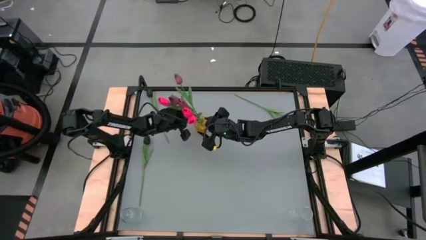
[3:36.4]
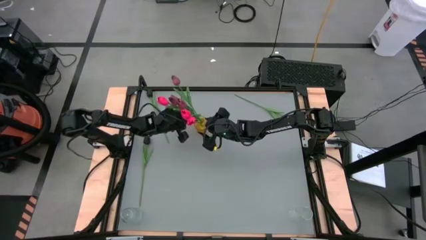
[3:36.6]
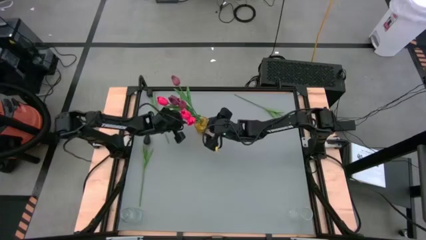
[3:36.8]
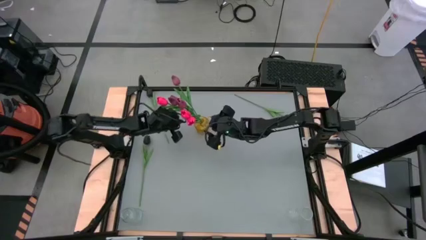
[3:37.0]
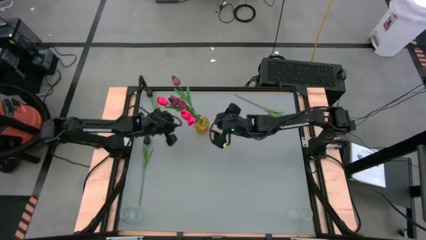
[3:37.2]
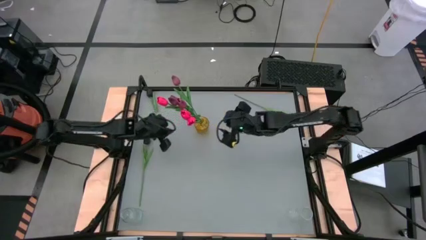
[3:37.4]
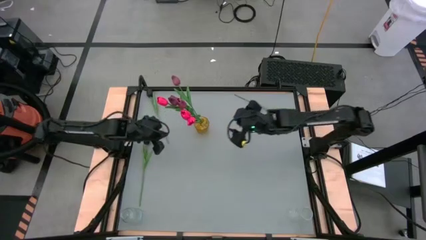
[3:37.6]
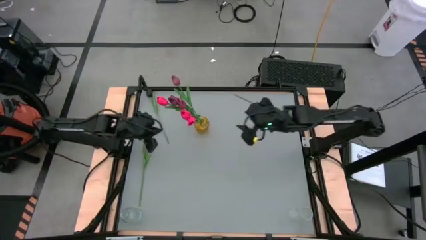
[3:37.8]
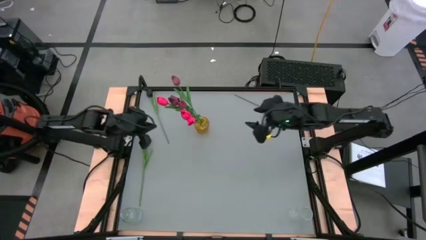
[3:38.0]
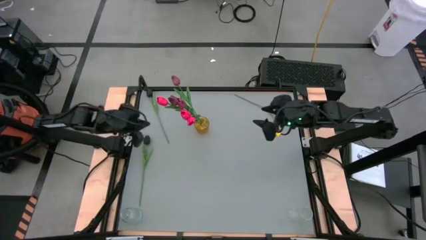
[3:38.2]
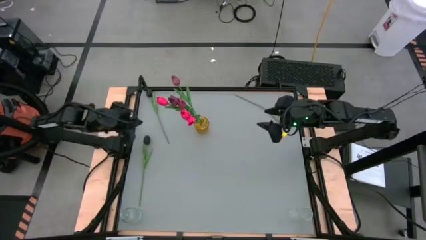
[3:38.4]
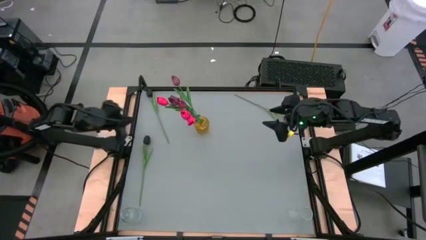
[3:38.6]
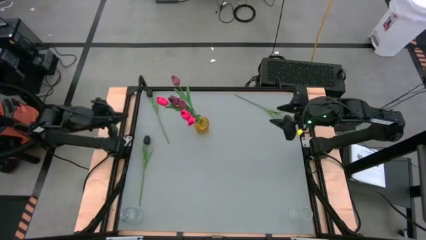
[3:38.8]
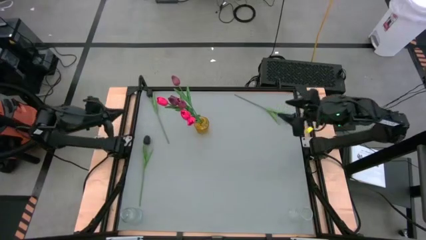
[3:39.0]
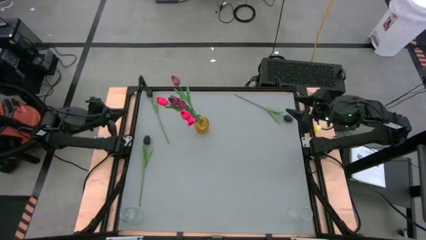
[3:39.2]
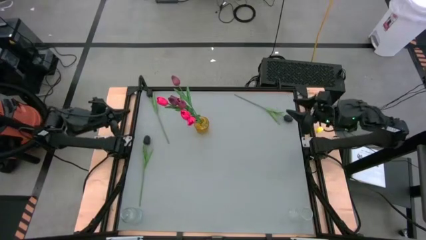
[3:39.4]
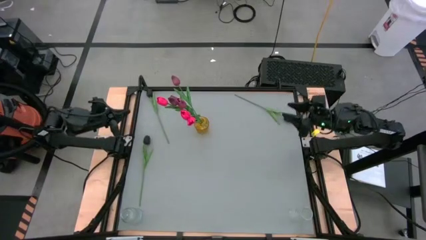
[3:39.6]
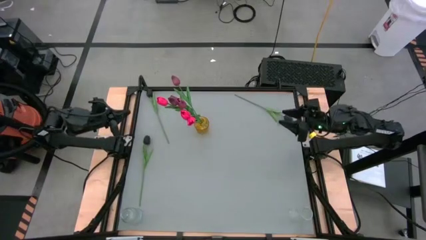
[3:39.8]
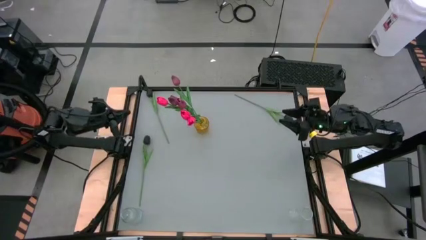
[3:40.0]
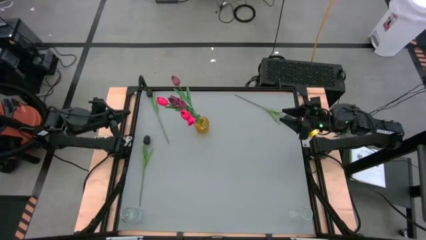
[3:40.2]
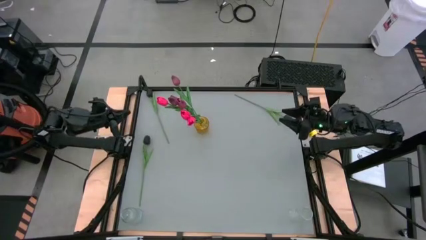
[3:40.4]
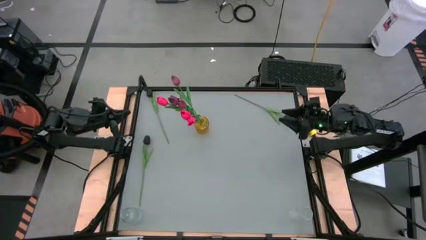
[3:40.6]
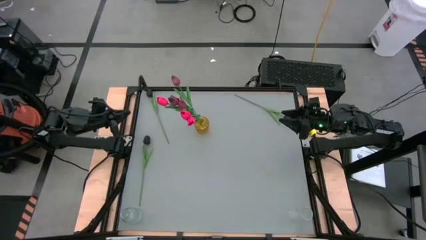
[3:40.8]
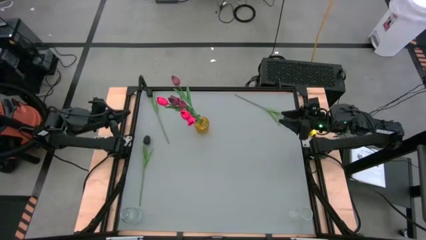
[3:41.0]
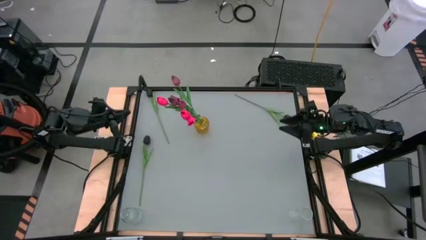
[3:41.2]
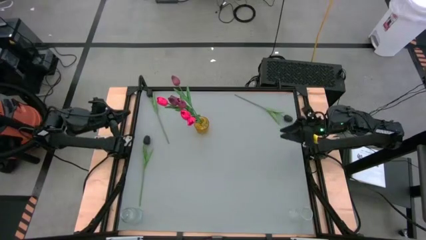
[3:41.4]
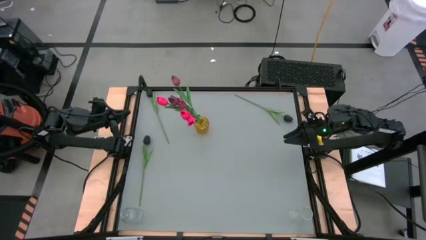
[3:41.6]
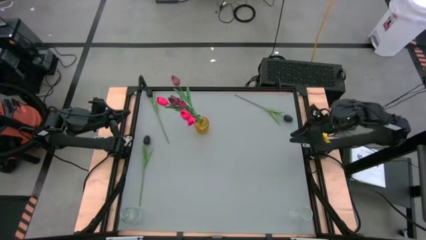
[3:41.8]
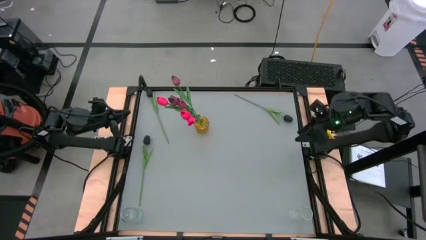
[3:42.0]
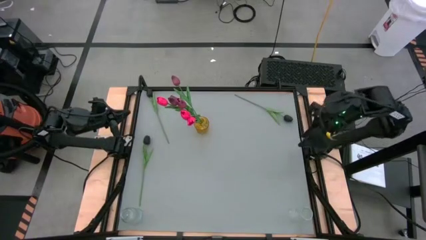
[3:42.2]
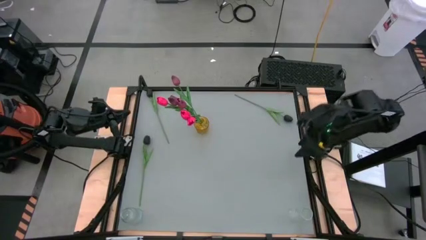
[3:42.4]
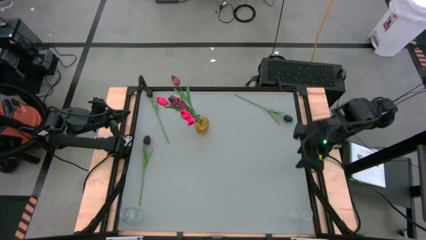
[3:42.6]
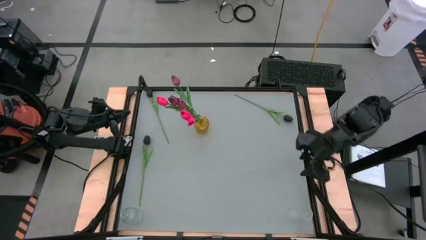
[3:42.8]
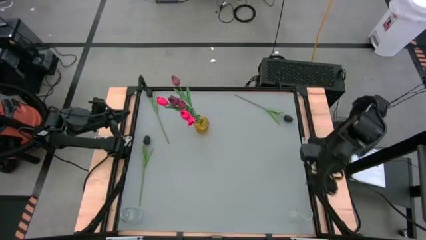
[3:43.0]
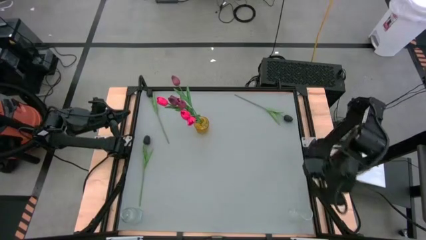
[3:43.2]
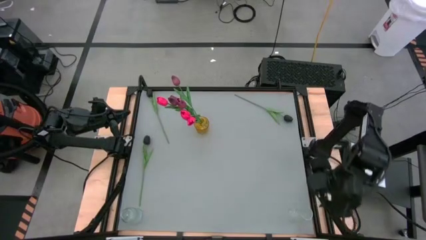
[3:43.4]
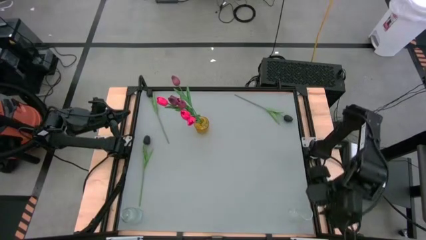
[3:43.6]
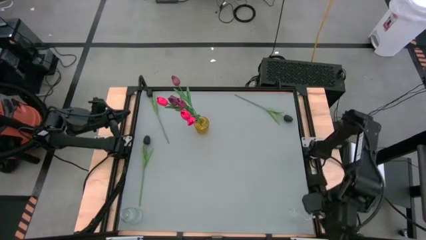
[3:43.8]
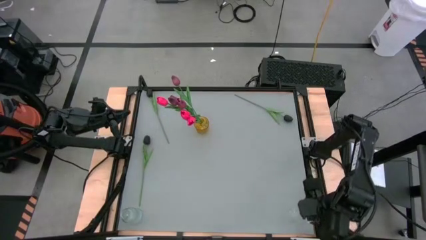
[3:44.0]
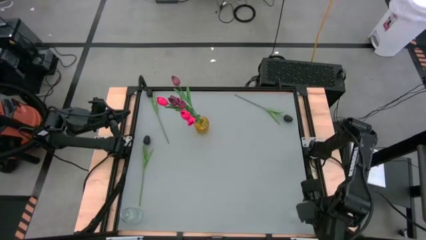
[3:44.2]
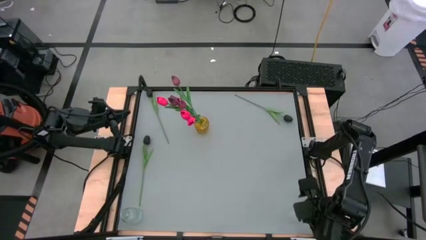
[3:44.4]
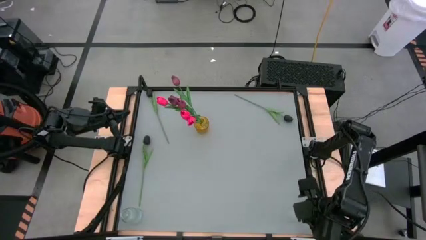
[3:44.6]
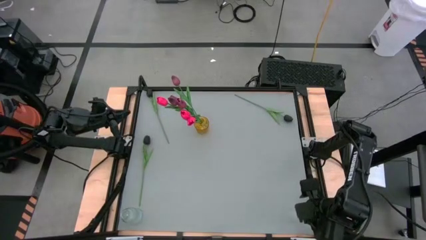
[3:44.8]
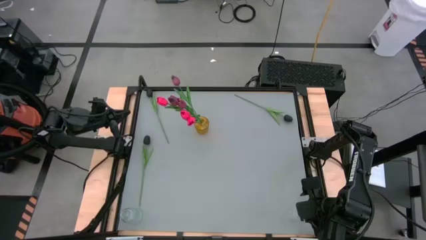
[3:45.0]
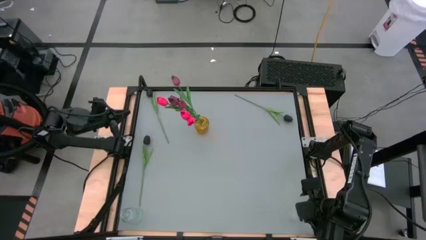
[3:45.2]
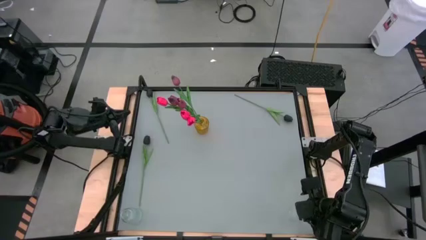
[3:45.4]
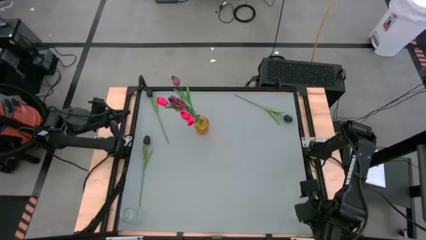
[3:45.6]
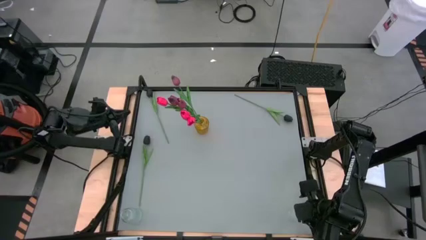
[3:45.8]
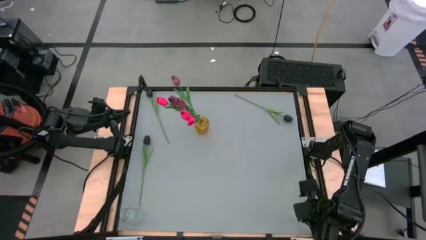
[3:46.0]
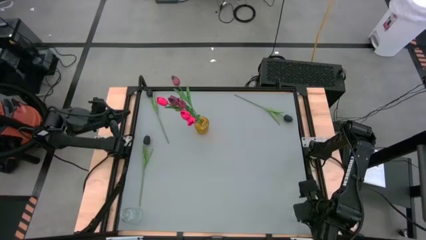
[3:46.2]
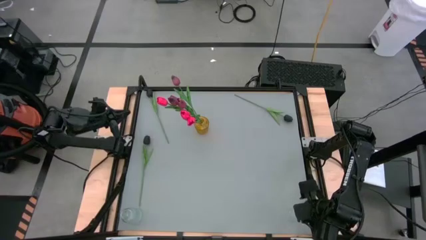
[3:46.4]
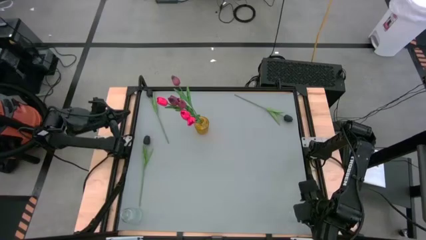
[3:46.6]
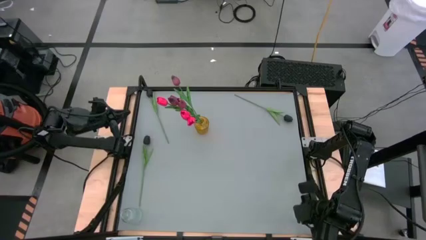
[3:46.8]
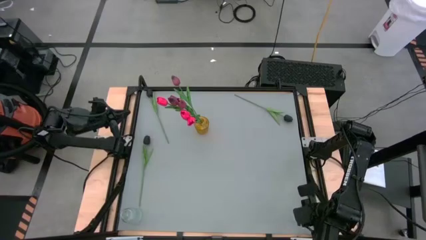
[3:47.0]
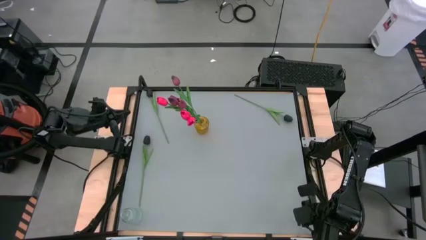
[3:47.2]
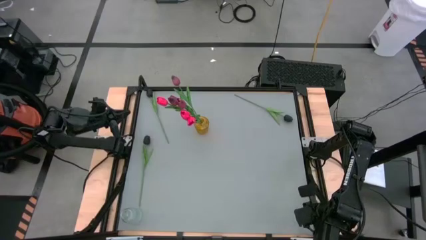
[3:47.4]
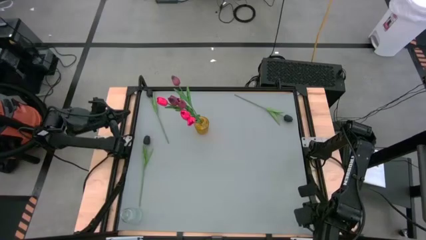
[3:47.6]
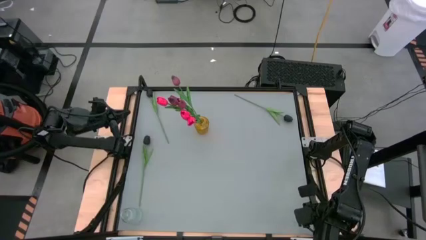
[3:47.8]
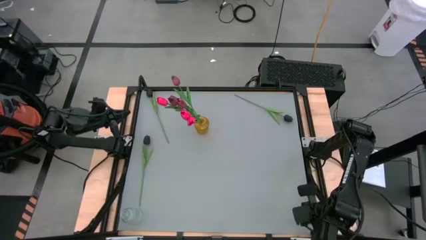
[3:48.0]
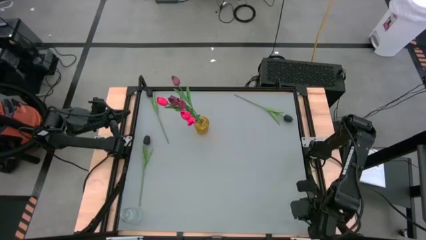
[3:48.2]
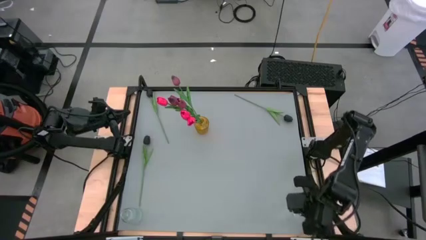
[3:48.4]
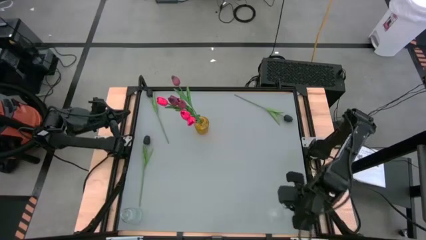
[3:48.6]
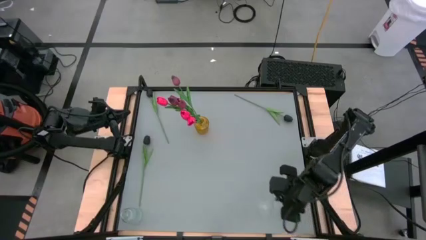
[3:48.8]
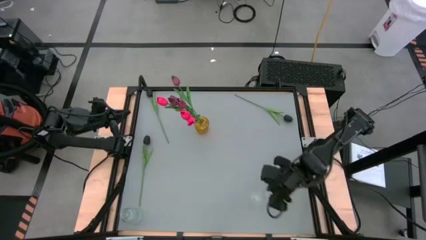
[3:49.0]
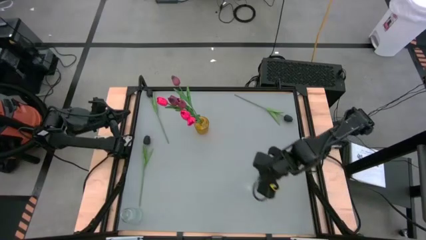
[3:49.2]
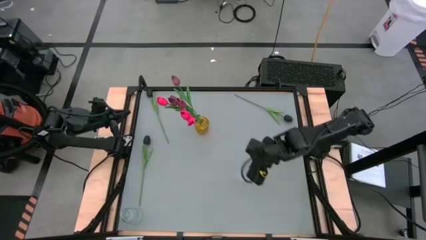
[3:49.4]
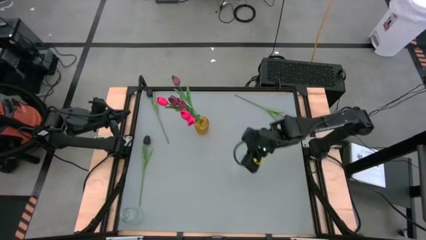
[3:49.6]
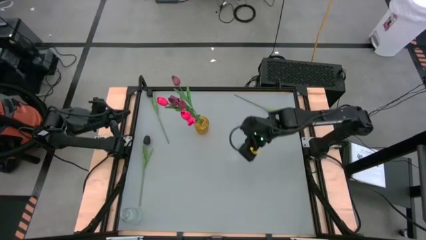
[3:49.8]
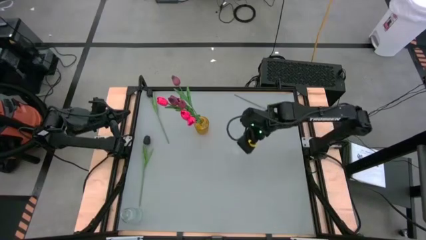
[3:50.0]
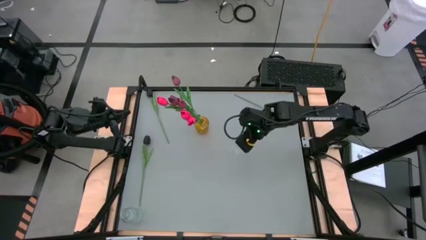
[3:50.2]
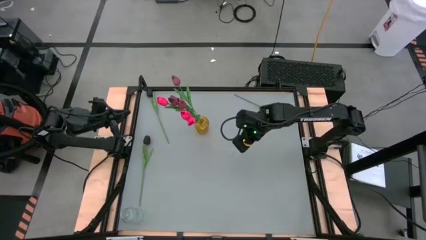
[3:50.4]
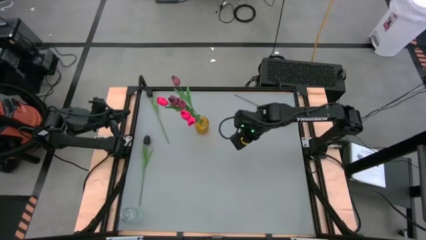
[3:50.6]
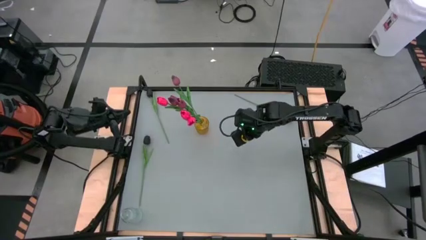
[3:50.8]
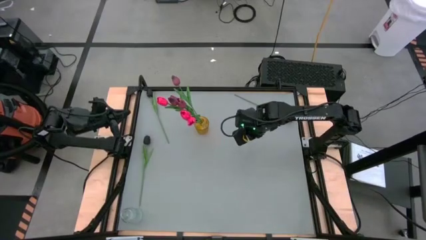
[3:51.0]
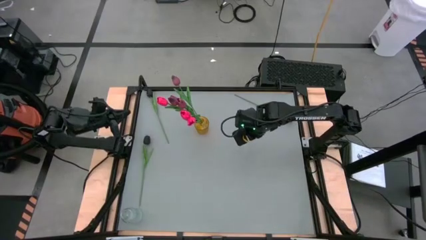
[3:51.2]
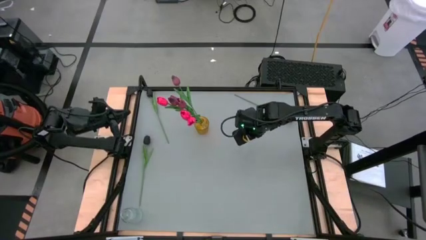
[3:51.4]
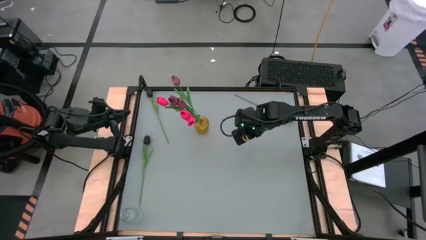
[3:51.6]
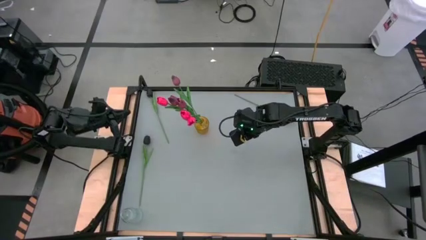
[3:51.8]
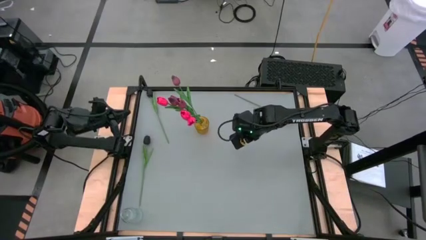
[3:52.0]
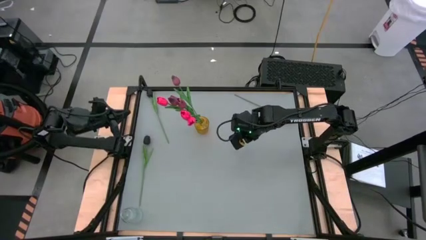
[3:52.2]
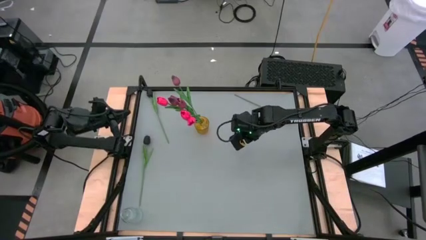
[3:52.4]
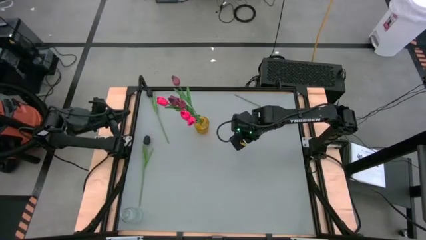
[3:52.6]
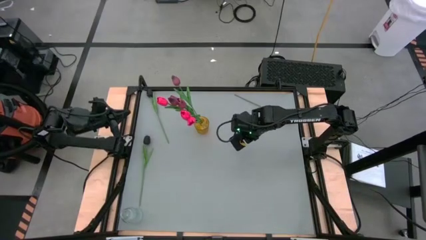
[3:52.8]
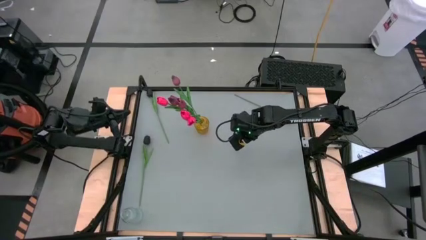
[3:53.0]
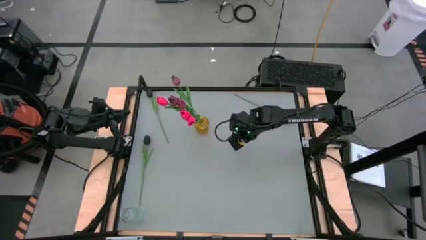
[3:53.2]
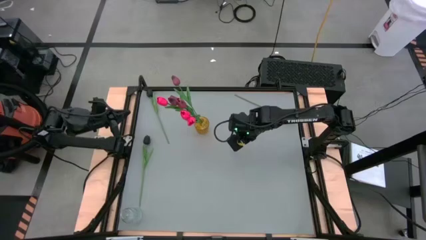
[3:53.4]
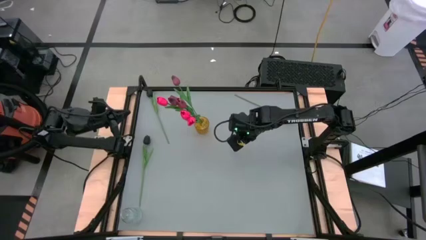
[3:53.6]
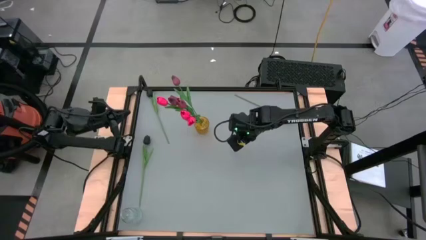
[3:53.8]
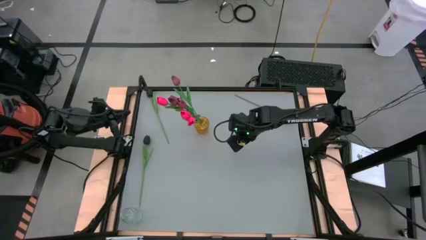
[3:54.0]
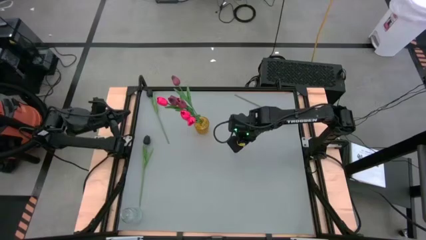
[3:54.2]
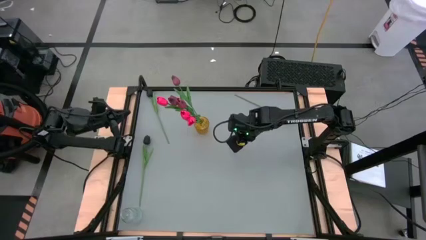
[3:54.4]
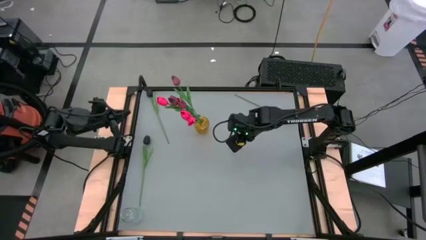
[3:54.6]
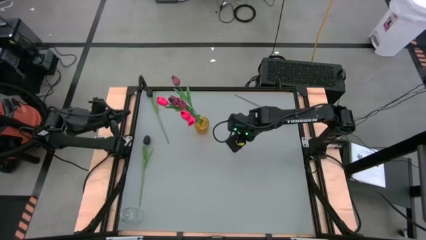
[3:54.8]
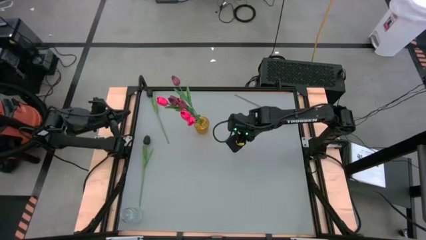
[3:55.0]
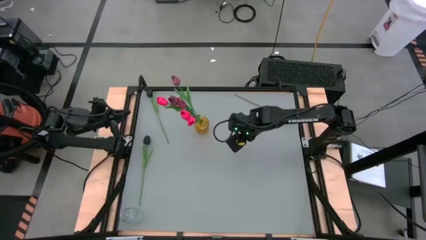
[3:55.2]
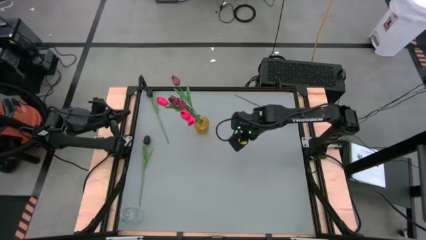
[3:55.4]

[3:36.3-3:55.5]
Task: Sort flowers into vase by color
Move the right transparent vase to the center
